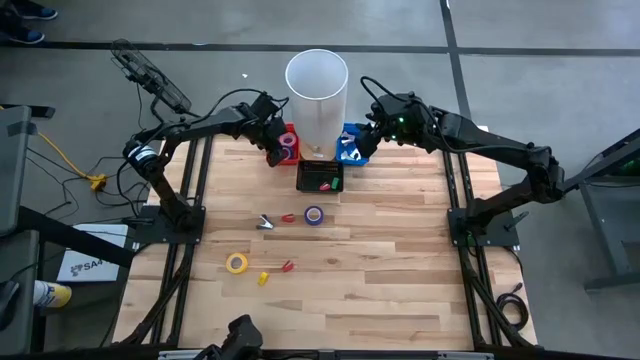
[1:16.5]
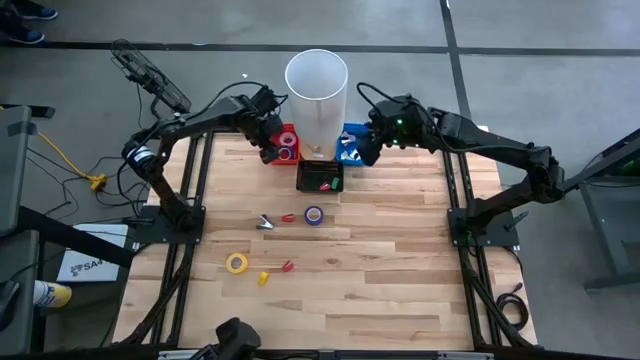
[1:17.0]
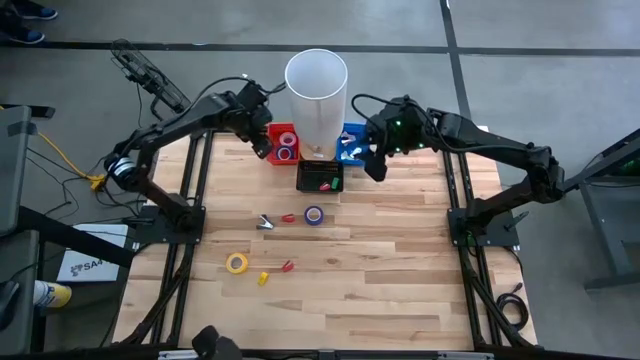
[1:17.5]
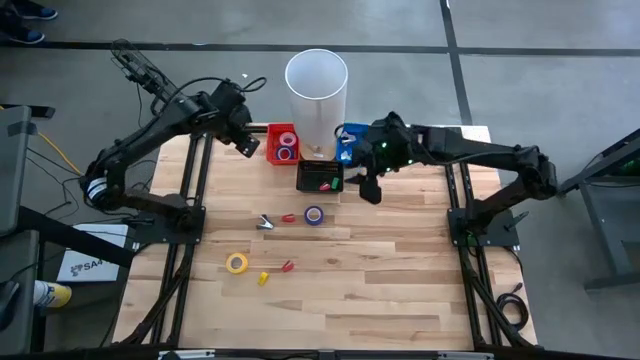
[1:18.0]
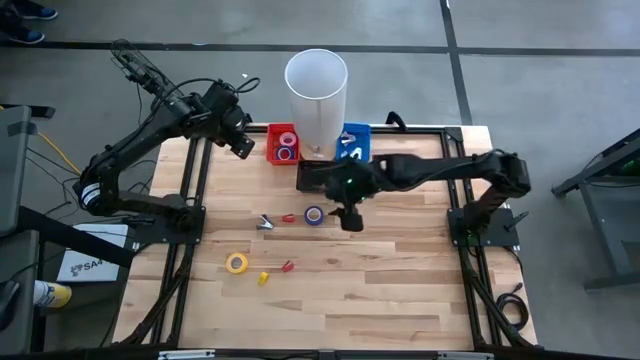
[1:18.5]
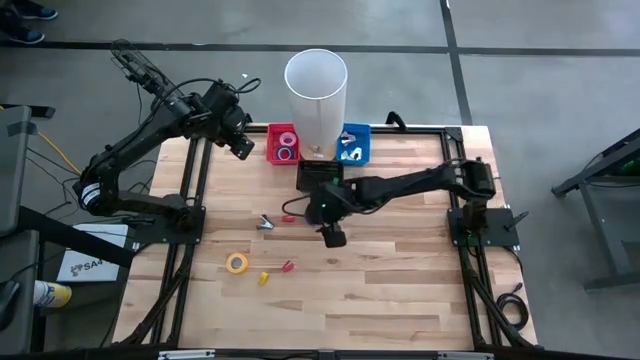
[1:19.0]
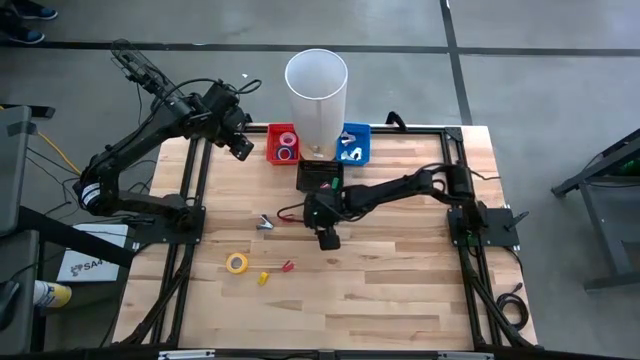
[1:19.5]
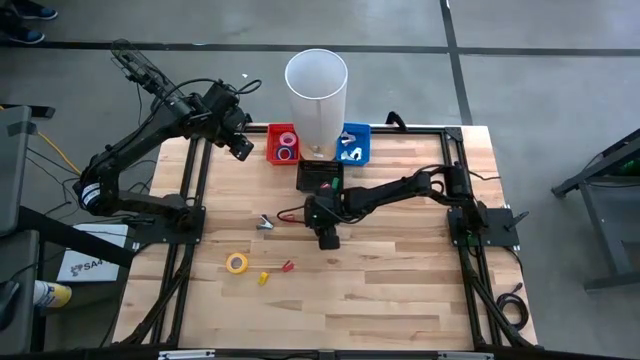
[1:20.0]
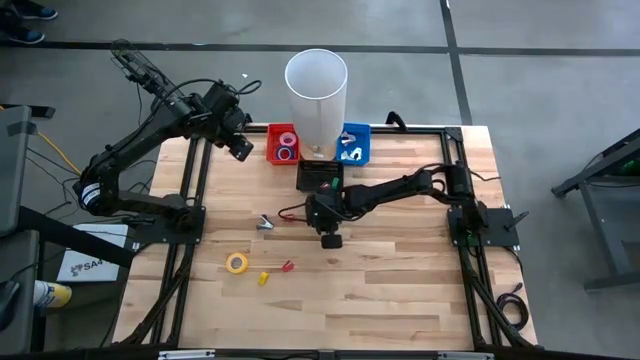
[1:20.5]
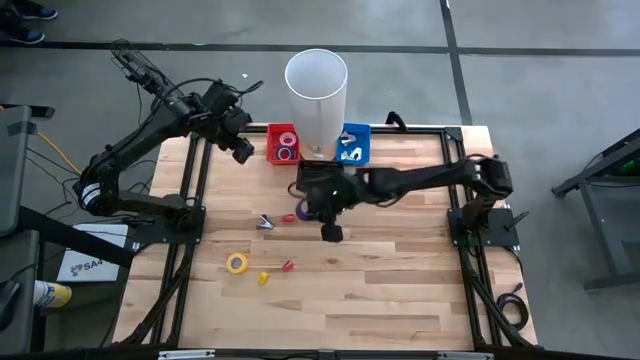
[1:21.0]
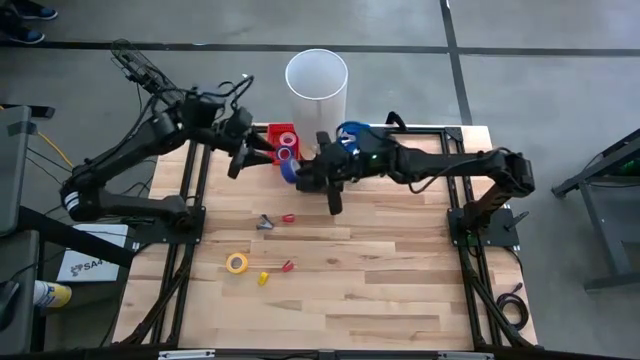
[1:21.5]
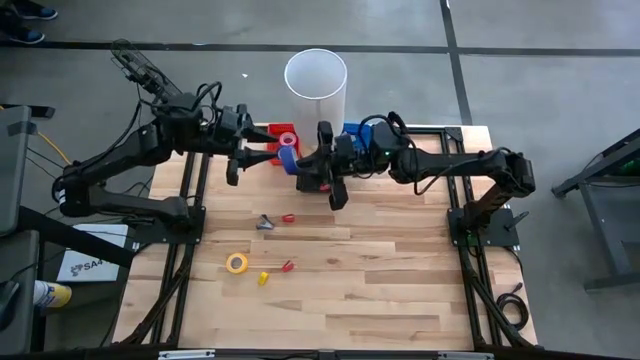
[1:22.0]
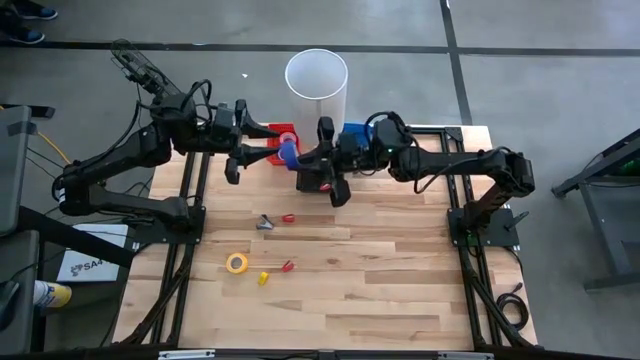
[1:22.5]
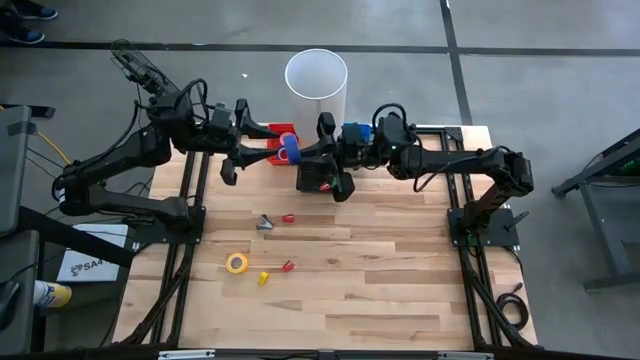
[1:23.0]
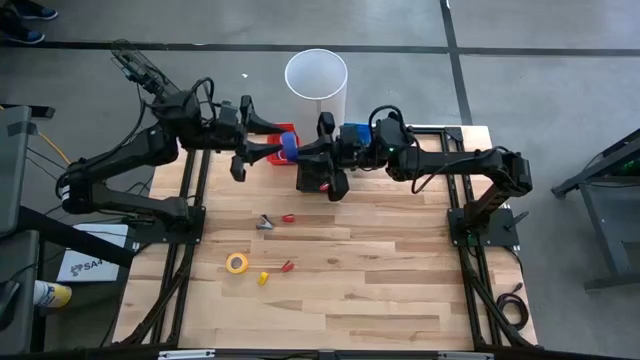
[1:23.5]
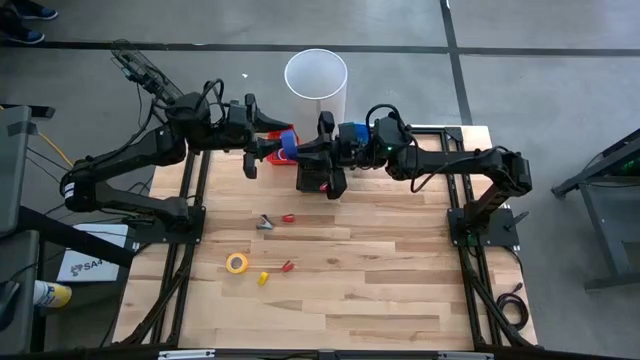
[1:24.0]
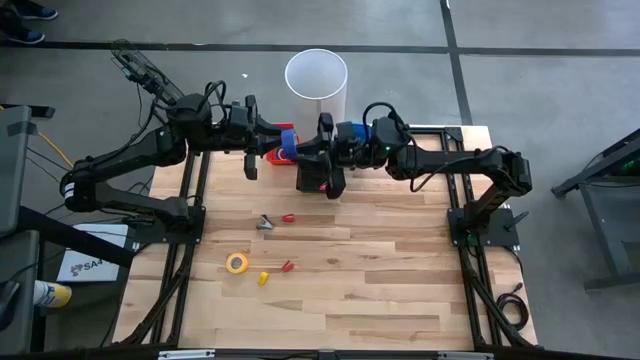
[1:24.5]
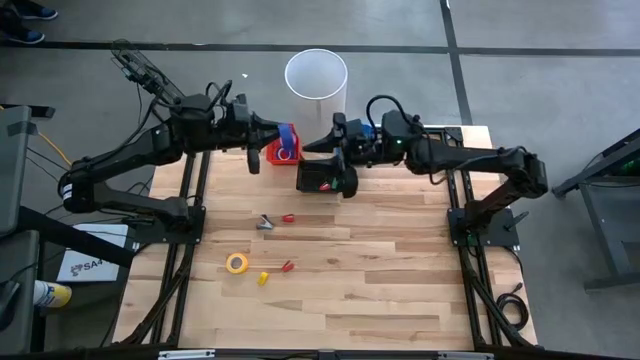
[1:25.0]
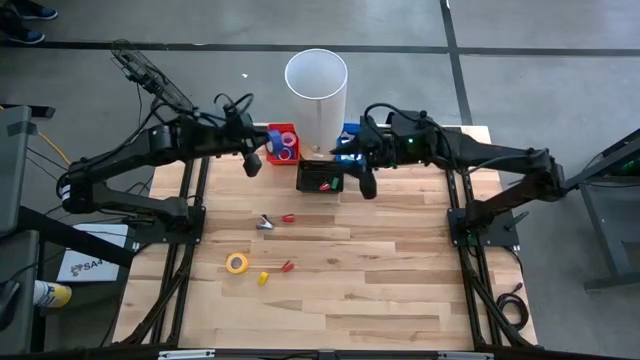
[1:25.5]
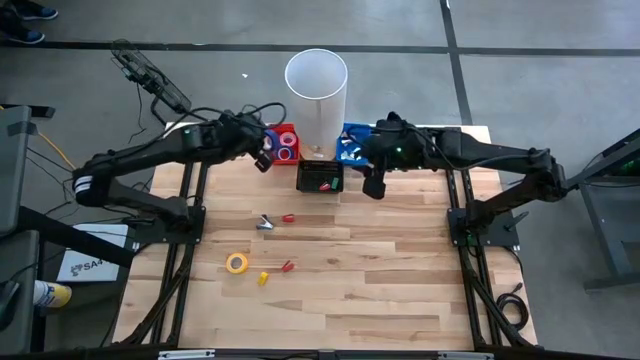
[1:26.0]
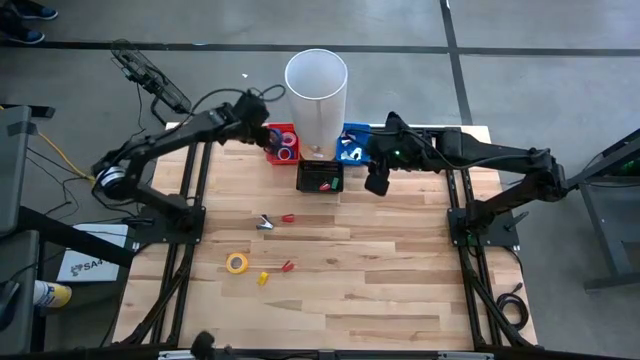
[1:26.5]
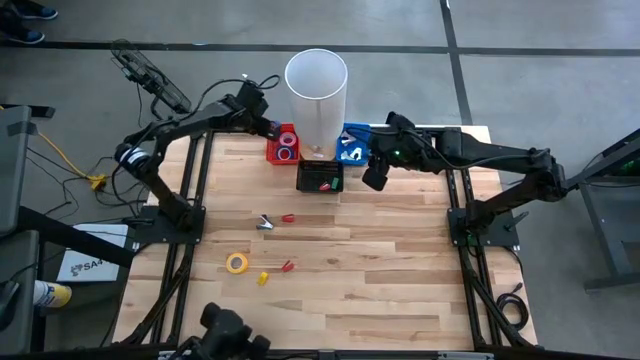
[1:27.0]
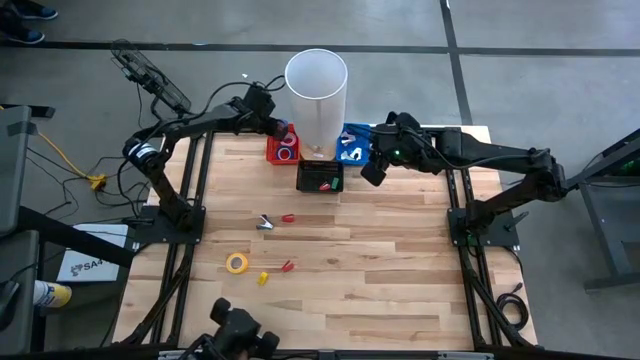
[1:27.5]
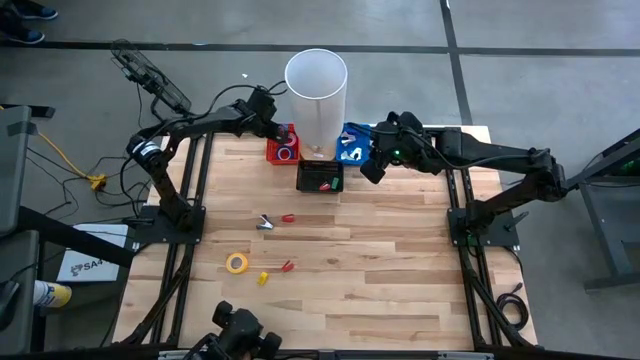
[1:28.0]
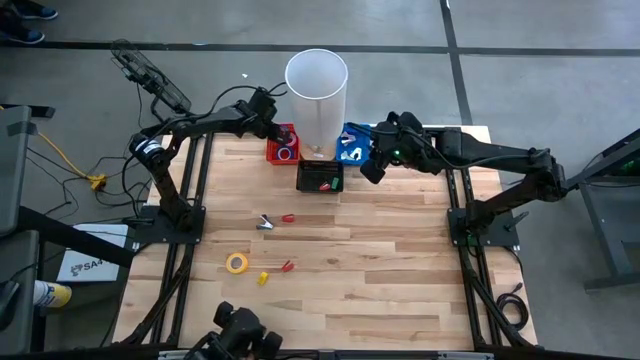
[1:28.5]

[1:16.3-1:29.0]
Task: Pick and place Stapler, Stapler remover, tape
Put the blue tape into the red bin

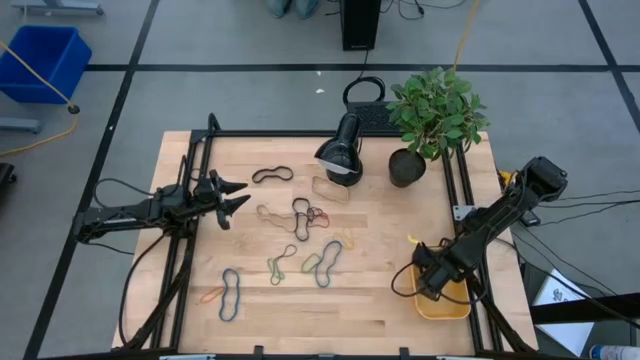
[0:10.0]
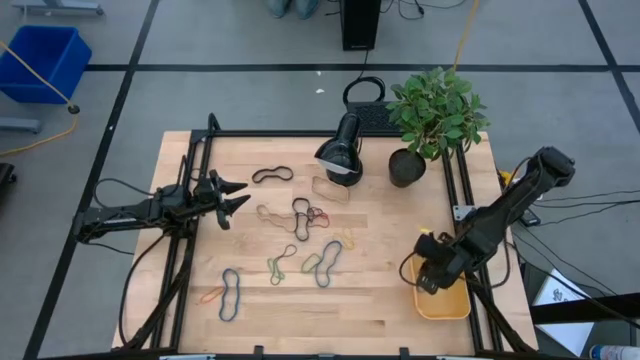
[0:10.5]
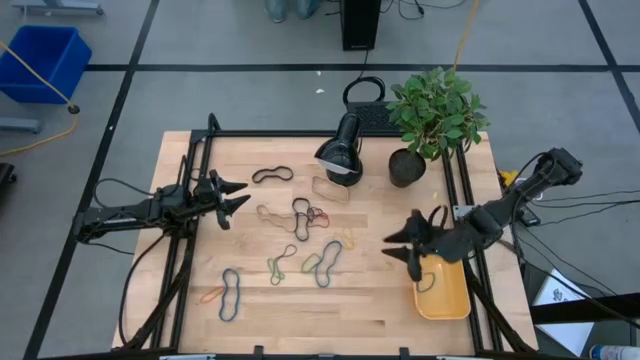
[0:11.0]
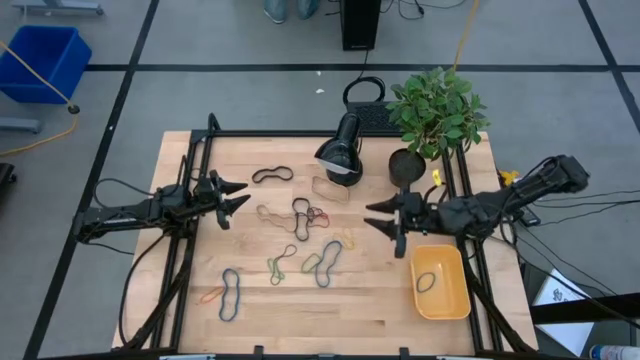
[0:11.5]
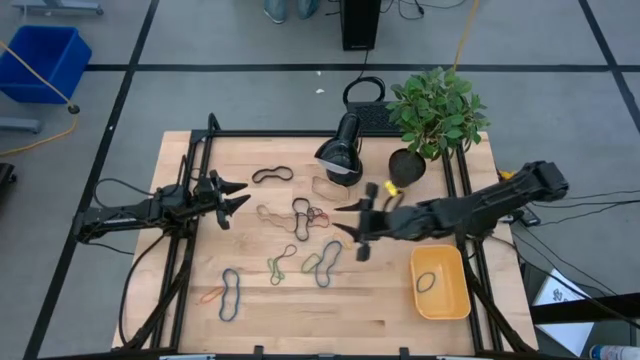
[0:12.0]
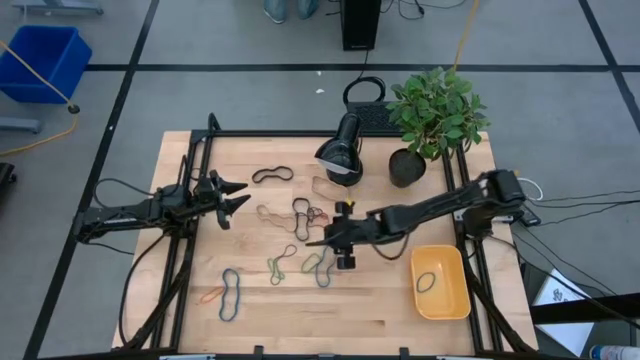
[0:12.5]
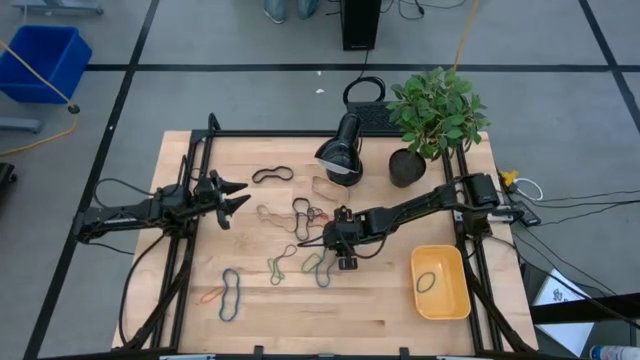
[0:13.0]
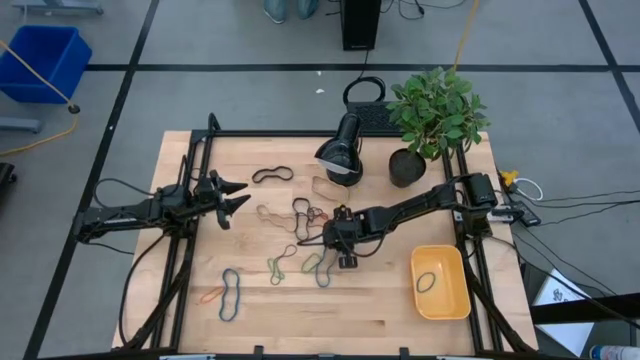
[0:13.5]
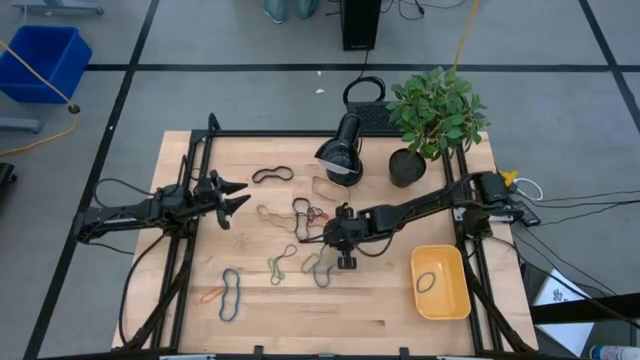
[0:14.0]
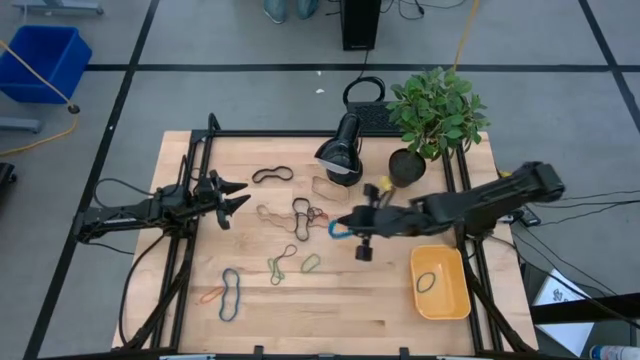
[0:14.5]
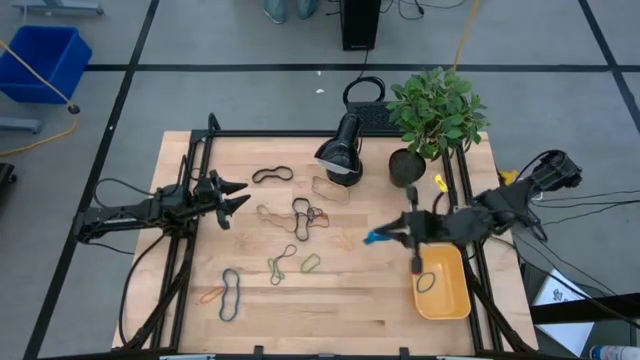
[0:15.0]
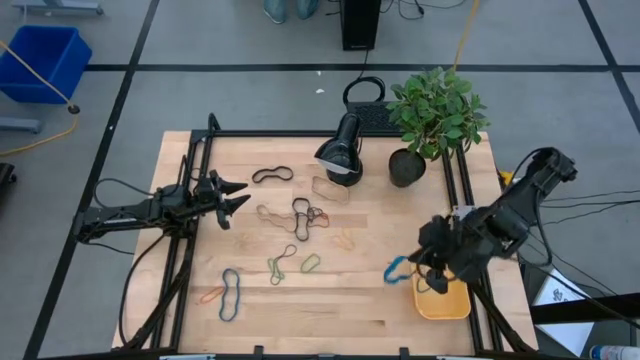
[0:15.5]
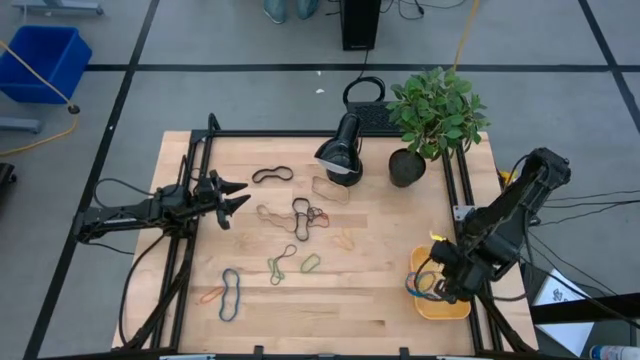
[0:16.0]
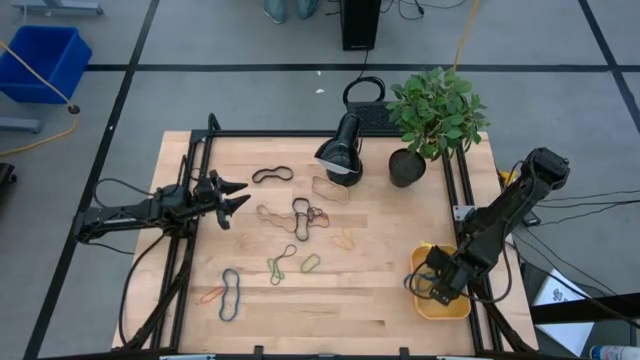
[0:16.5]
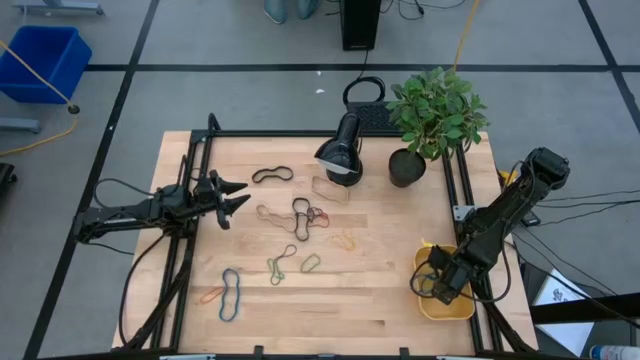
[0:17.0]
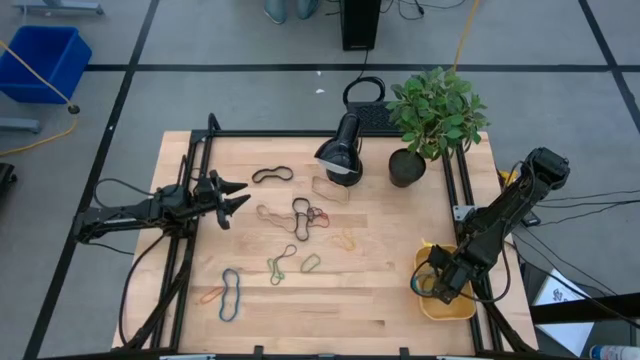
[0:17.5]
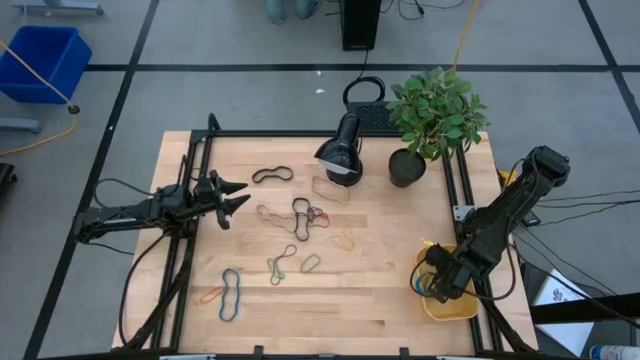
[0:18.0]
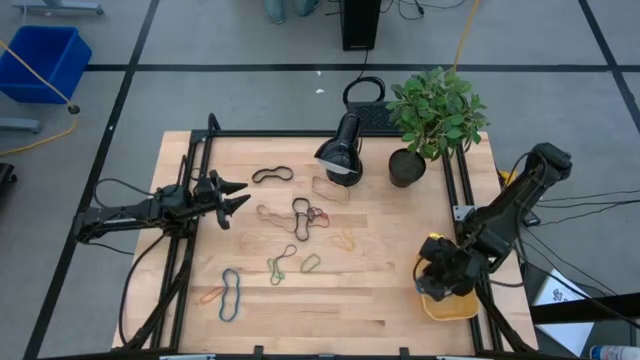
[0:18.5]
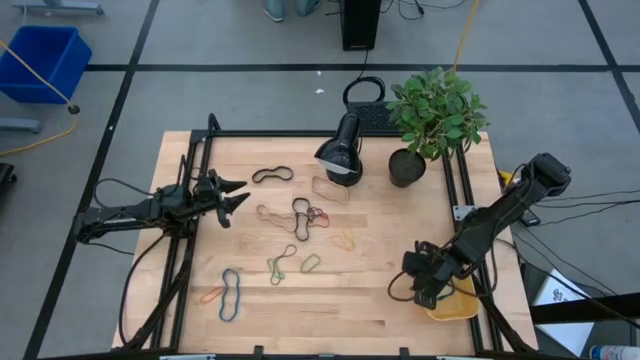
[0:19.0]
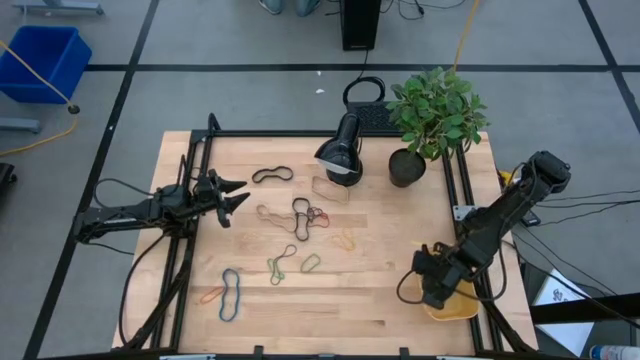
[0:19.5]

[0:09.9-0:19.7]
Task: Pick and place rubber bands into bin
Put the blue rubber band into the yellow bin
